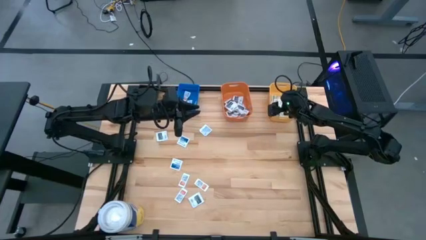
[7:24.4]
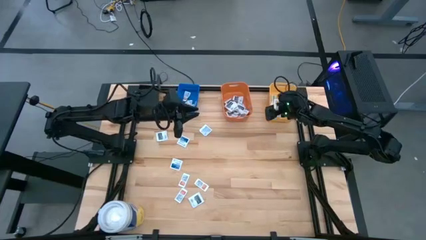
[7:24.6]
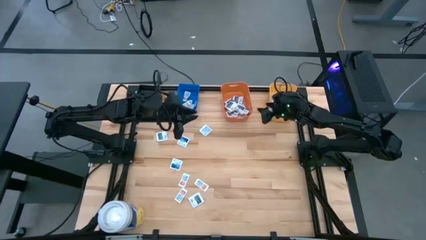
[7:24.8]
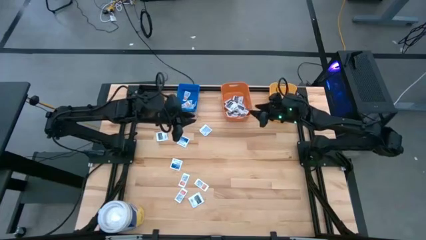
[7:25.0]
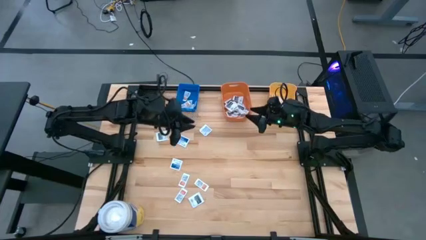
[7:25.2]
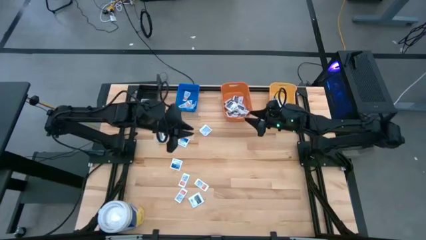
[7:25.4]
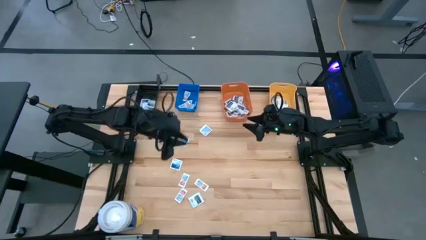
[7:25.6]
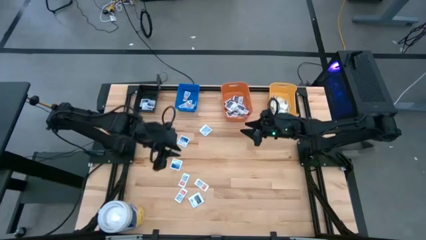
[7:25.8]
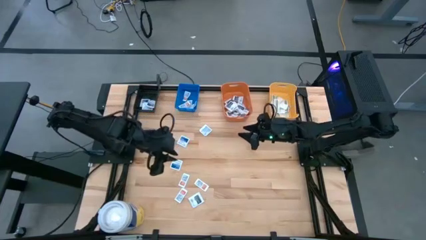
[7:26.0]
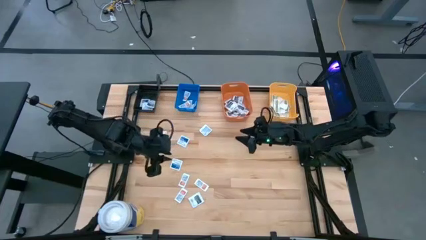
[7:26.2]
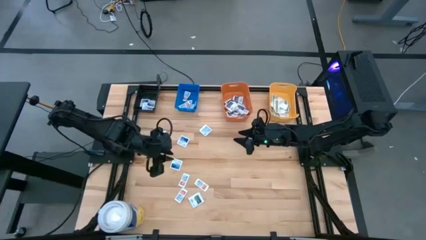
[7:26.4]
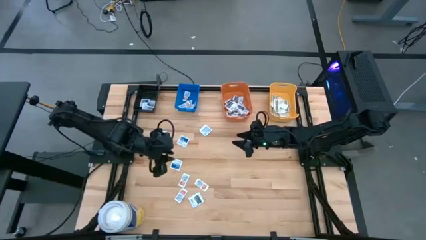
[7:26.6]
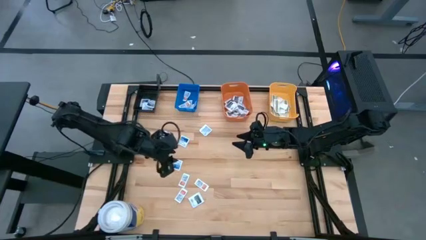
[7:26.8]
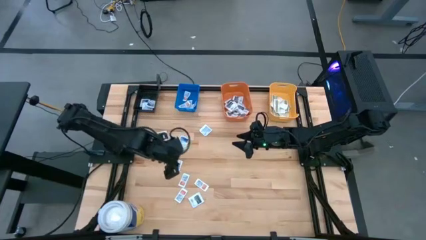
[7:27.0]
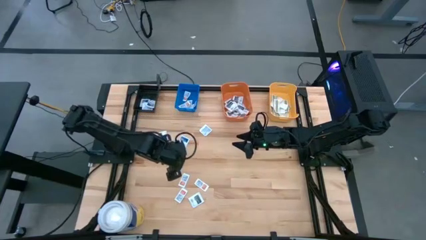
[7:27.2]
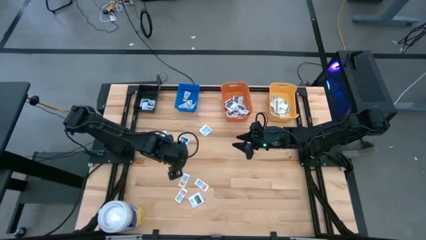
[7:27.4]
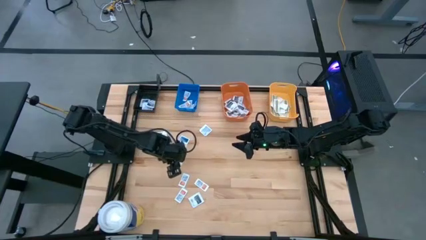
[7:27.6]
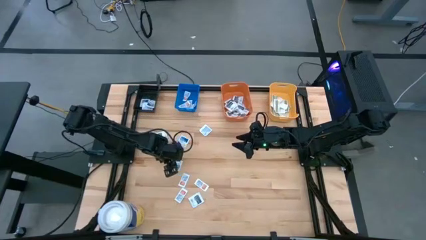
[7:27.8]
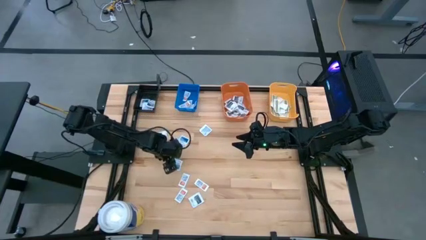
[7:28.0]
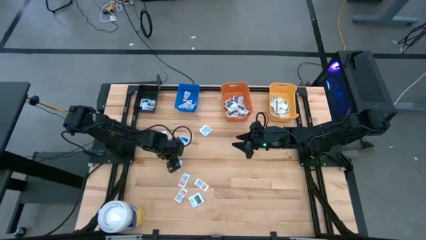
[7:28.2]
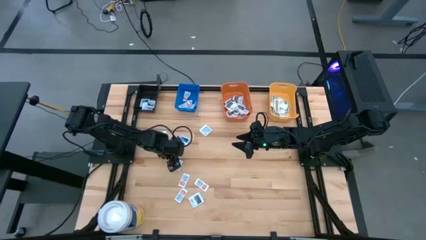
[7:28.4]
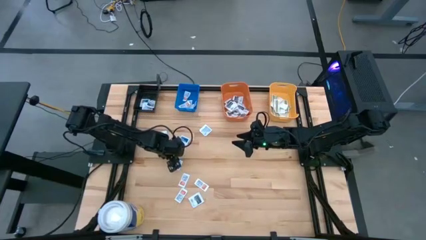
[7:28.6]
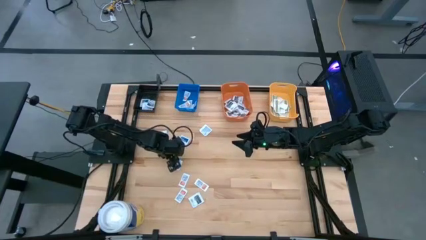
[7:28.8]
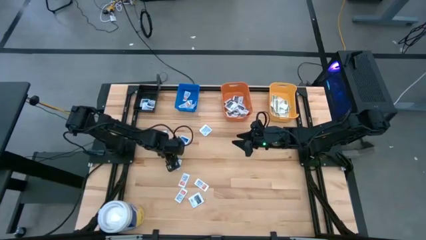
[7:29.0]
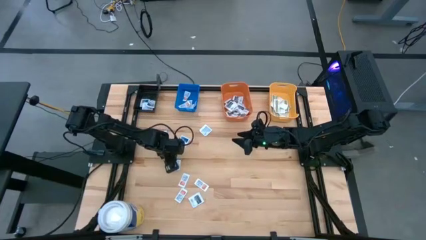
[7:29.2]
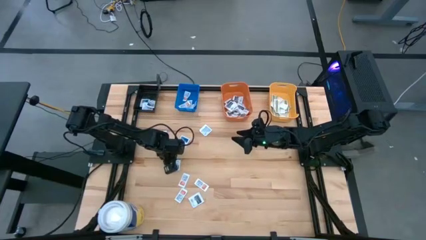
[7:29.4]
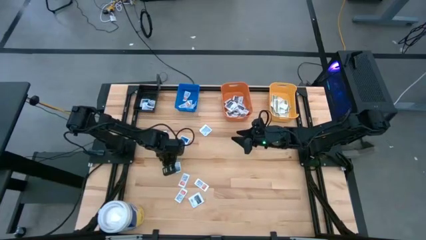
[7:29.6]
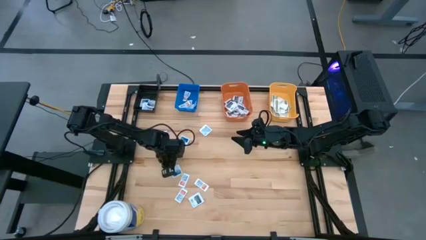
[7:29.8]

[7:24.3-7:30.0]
Task: Pick & Place First Aid Supplies
Put the alcohol pad into the black bin

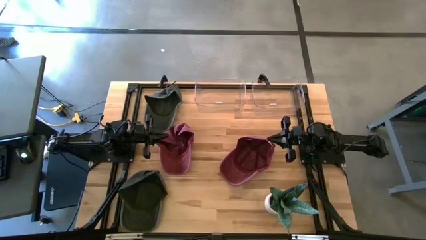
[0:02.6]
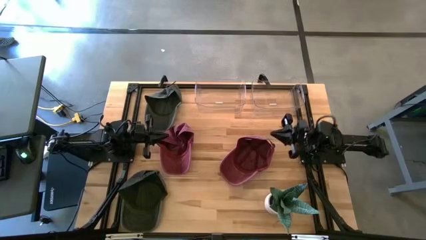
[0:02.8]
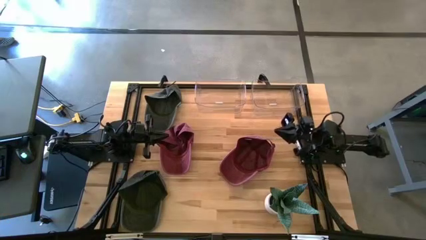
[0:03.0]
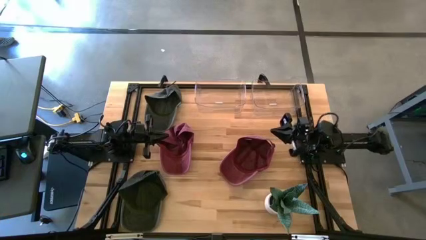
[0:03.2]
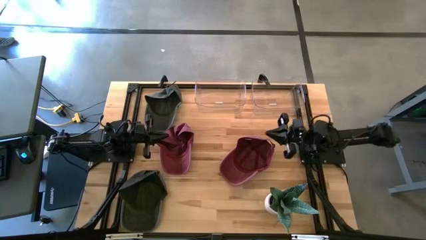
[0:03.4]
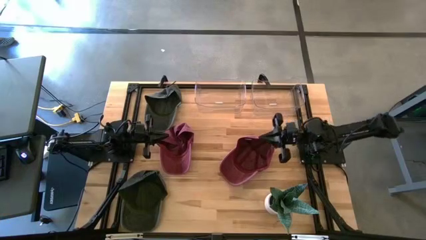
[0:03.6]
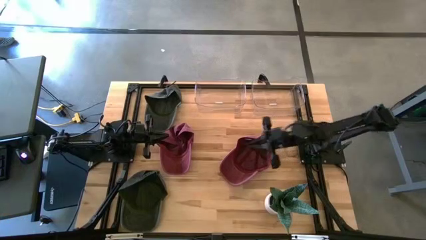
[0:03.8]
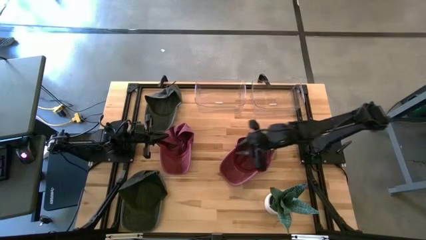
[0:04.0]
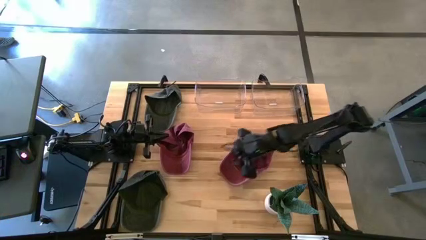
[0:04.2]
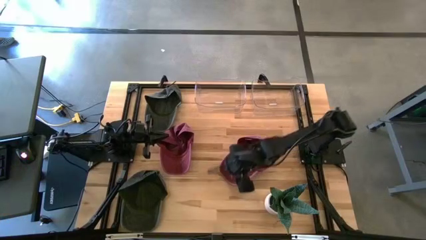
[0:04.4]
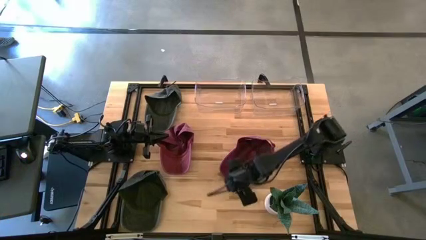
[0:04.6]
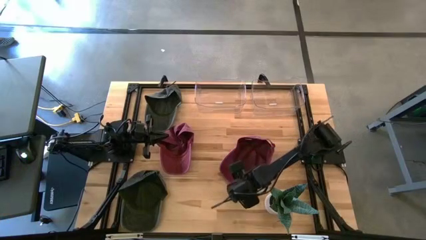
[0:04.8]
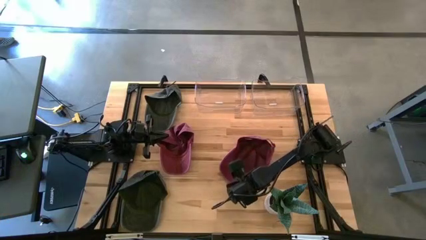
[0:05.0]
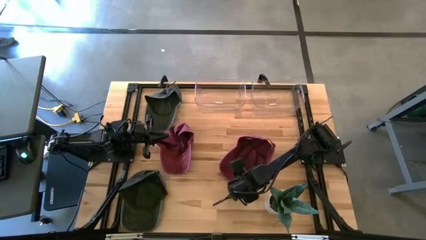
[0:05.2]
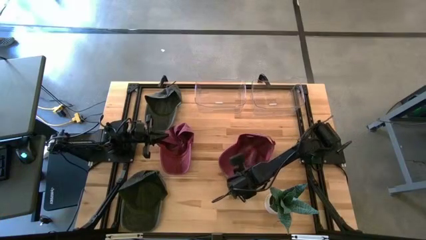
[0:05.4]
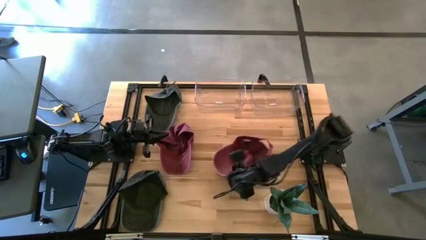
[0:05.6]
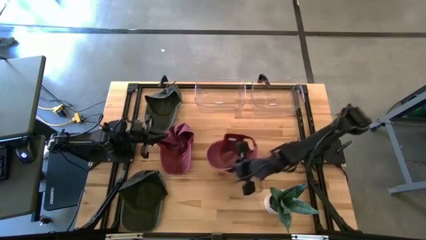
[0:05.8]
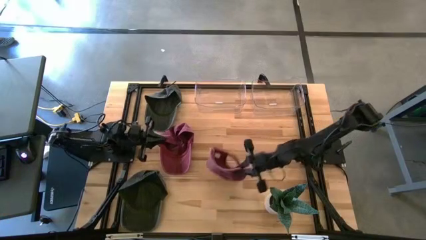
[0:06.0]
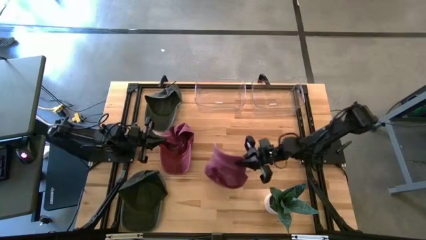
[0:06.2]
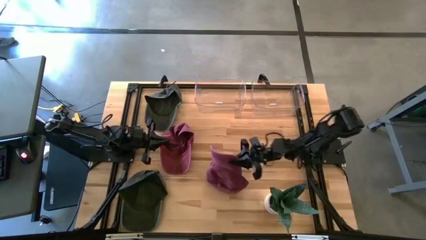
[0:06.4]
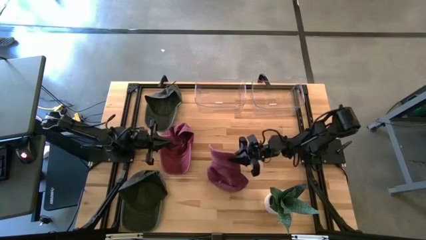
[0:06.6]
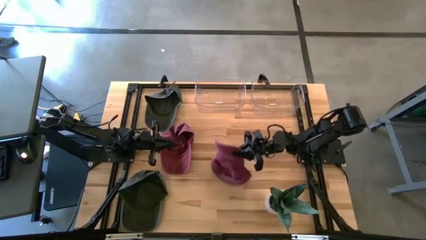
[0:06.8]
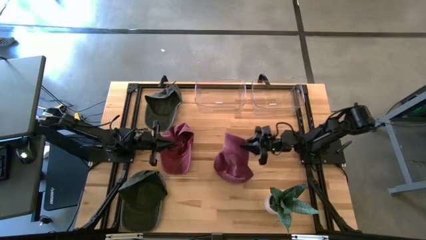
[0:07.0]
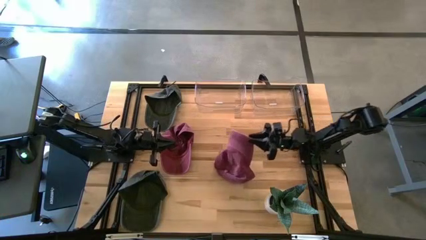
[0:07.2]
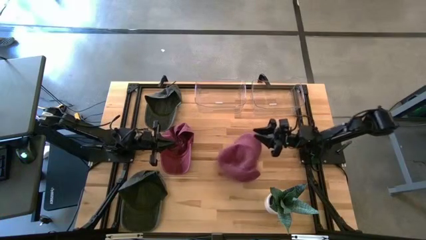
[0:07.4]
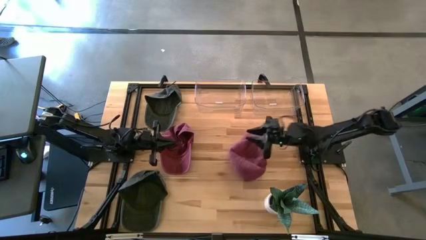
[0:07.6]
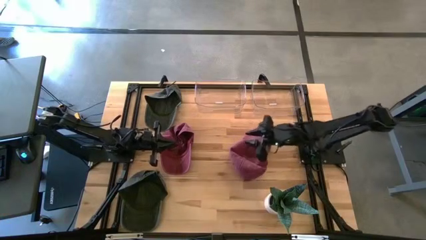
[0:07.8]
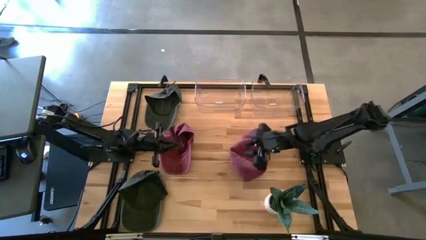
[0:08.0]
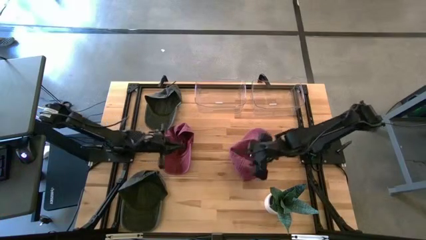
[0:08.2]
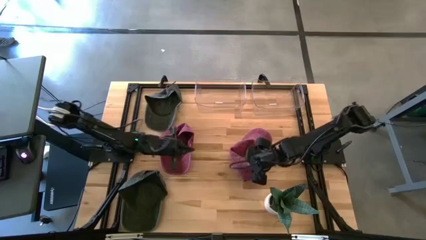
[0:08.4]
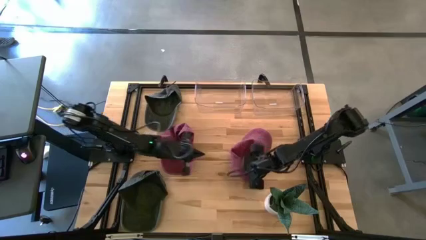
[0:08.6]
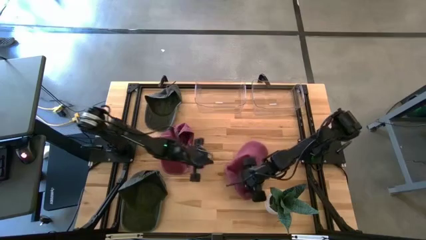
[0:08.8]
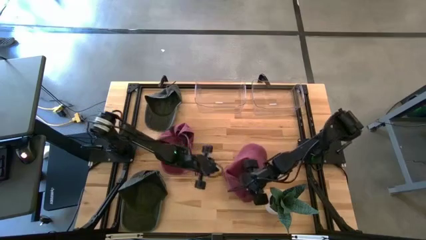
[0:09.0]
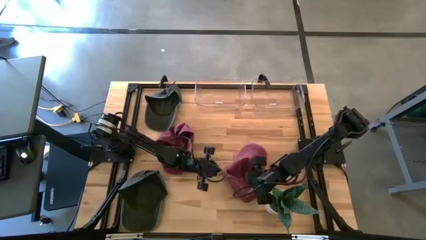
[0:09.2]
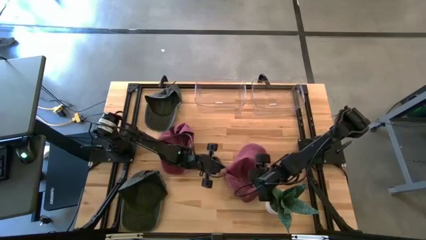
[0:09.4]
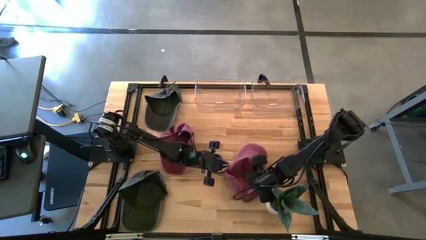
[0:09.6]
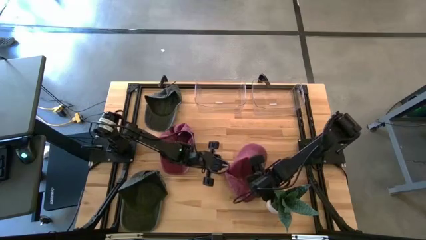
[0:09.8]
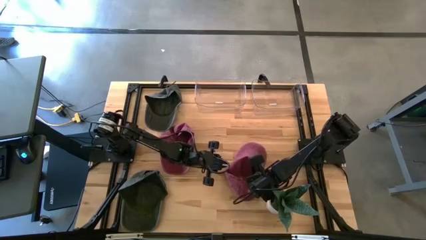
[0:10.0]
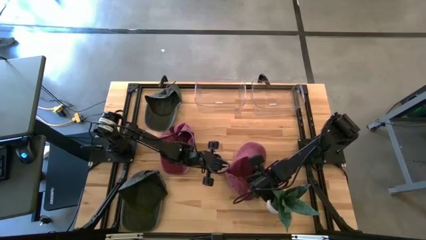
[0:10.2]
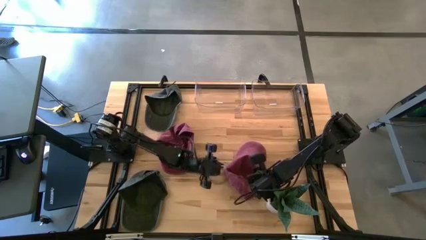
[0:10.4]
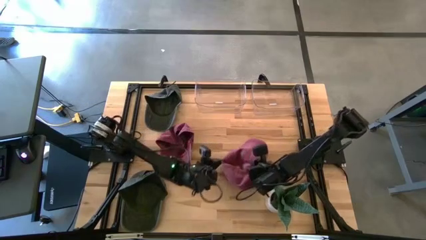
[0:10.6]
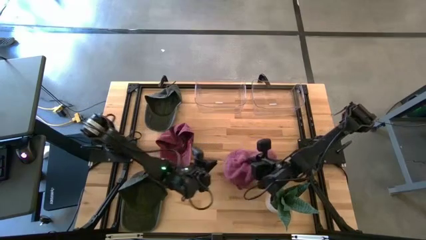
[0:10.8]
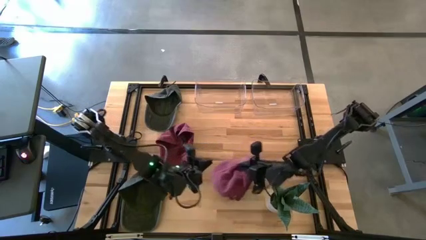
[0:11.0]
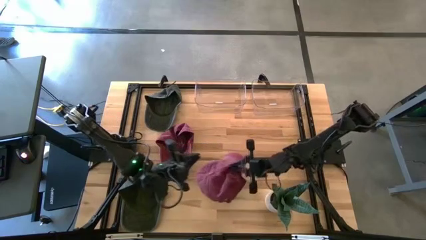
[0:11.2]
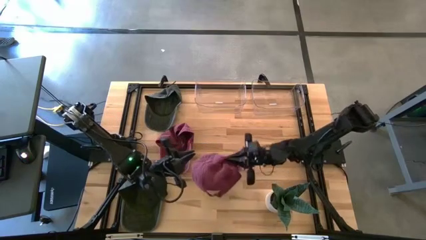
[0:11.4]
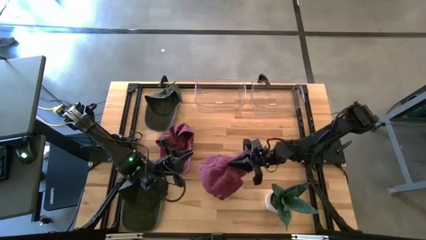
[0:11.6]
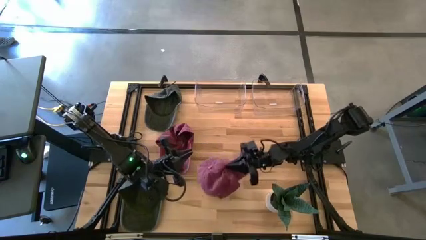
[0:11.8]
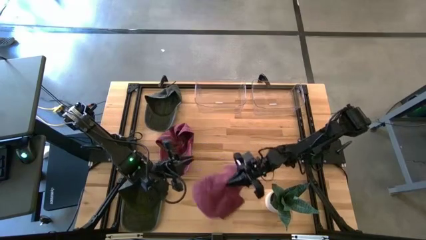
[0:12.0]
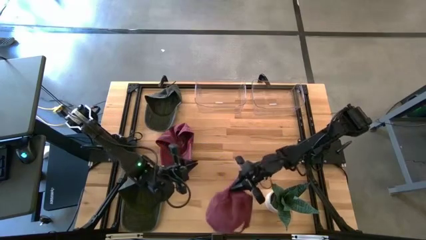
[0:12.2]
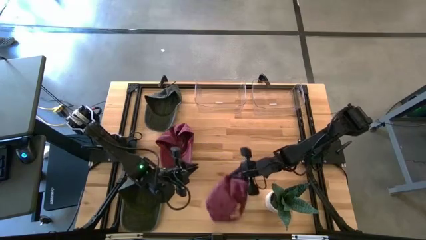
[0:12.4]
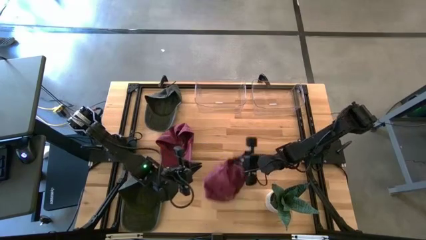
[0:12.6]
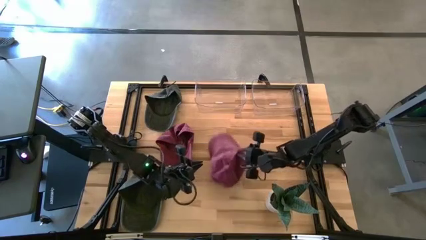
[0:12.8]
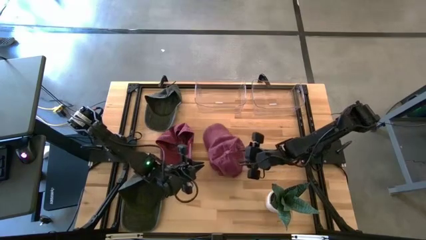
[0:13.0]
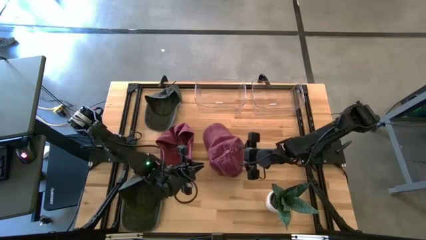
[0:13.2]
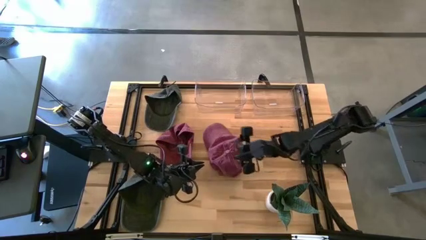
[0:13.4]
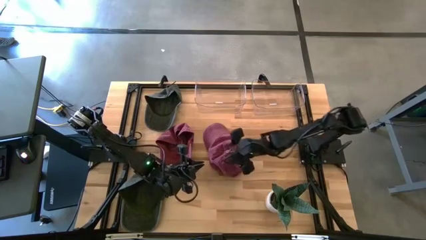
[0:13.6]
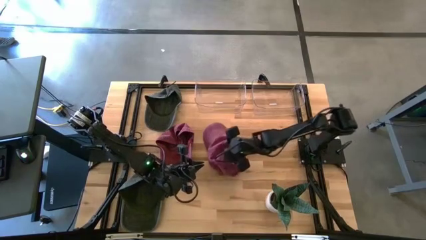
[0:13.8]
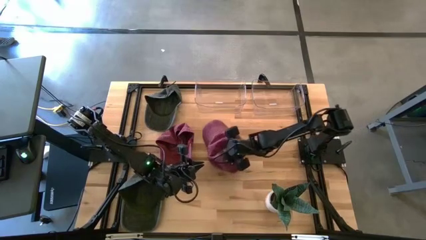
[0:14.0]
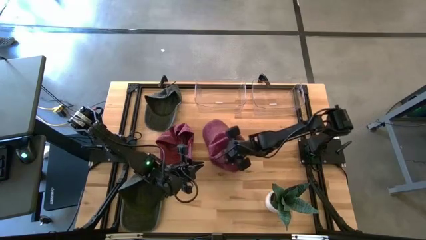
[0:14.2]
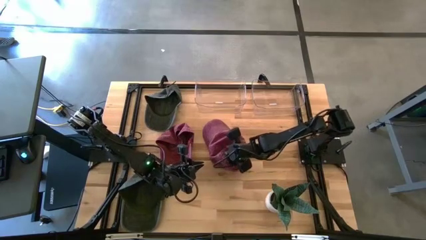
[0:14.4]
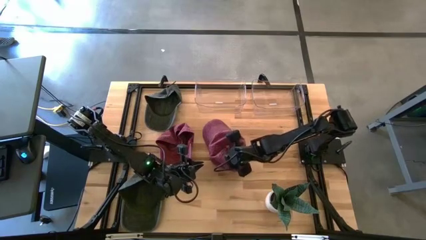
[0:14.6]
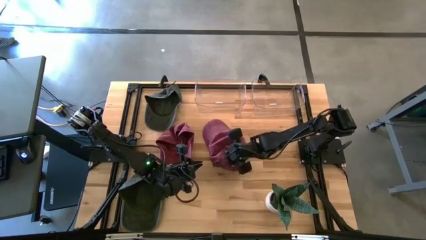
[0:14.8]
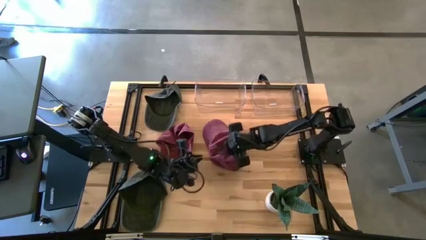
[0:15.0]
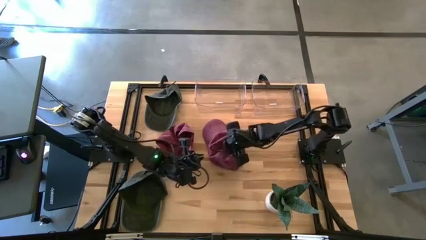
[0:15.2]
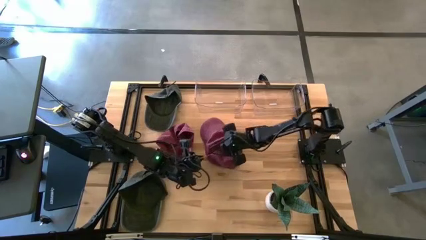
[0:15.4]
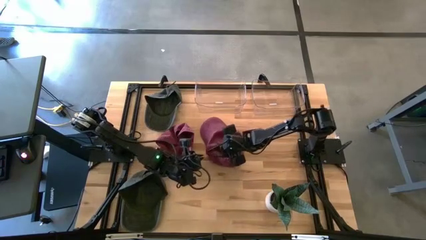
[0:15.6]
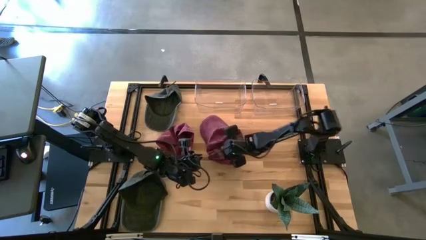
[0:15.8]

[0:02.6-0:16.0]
Task: Pick & Place hat
Put the right red cap into the left transparent bin
